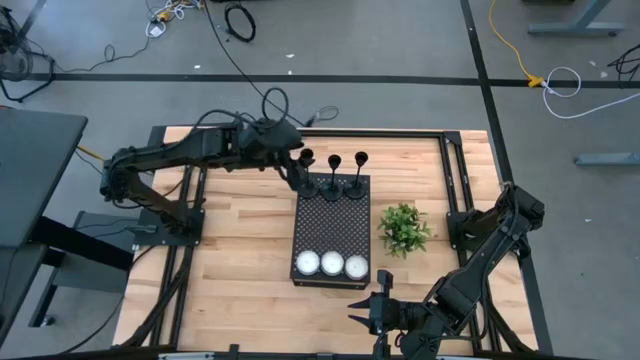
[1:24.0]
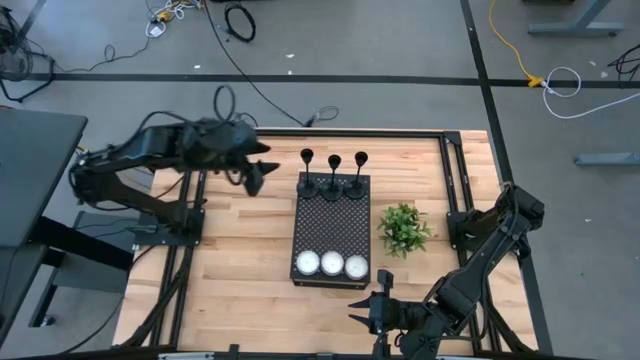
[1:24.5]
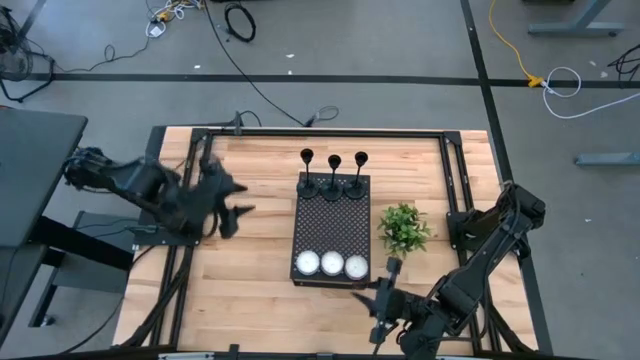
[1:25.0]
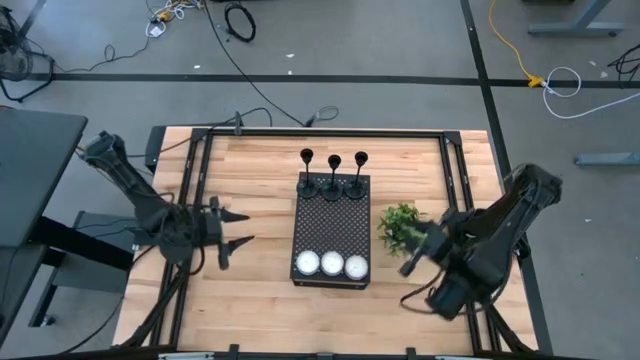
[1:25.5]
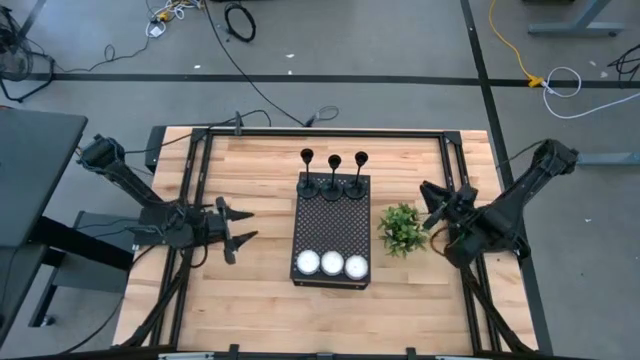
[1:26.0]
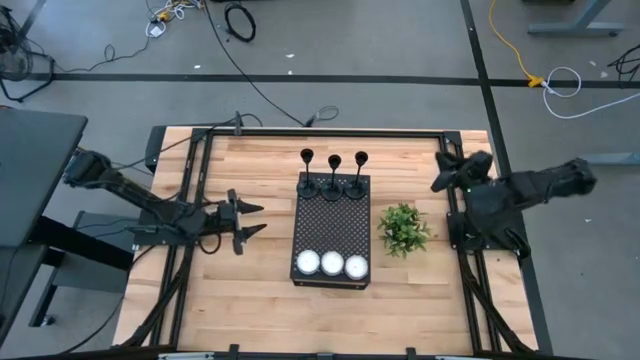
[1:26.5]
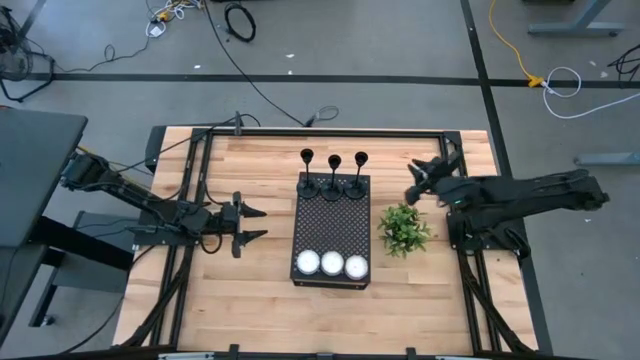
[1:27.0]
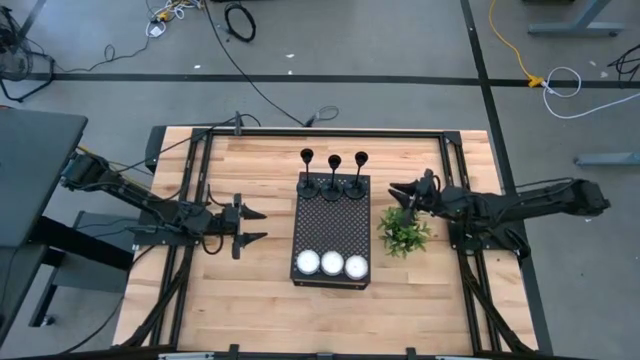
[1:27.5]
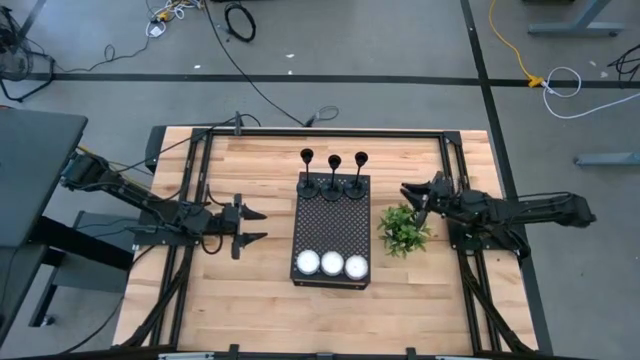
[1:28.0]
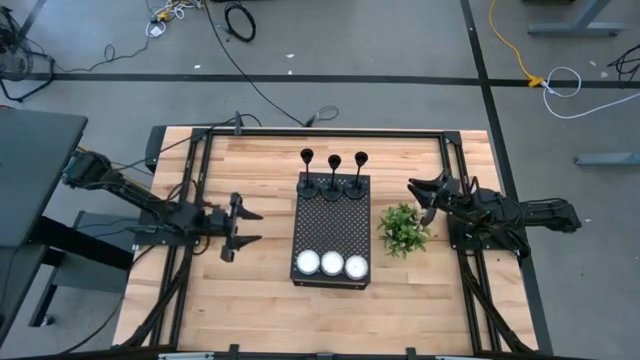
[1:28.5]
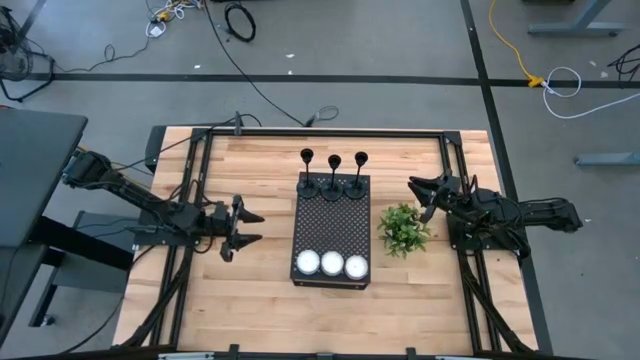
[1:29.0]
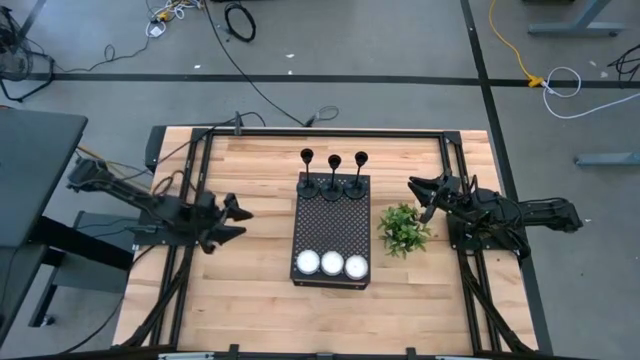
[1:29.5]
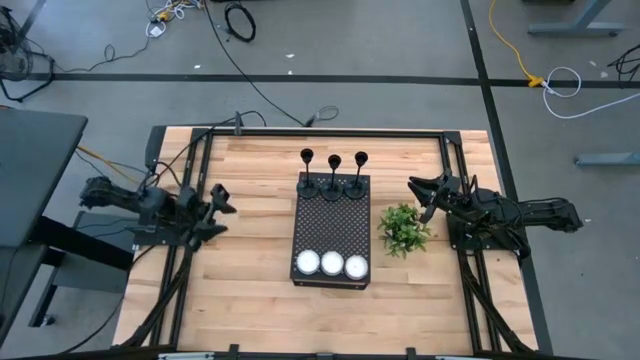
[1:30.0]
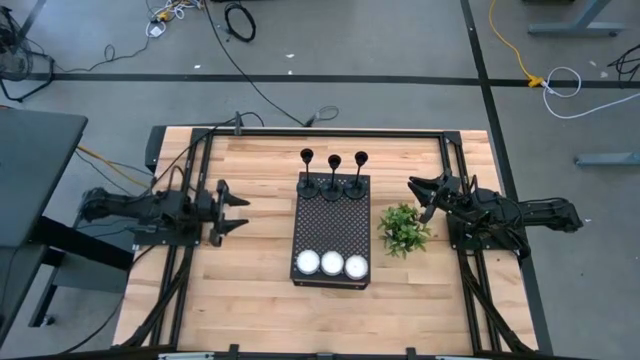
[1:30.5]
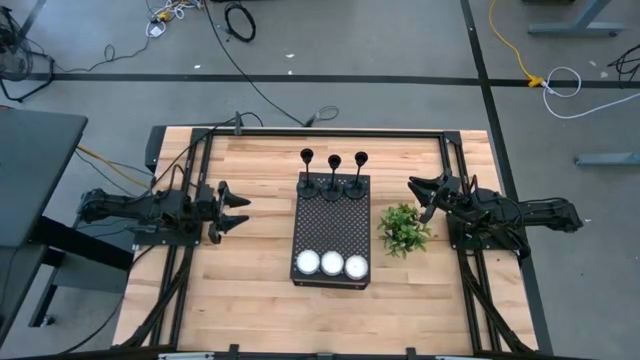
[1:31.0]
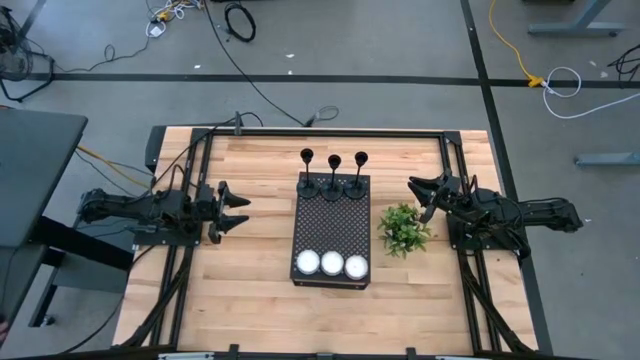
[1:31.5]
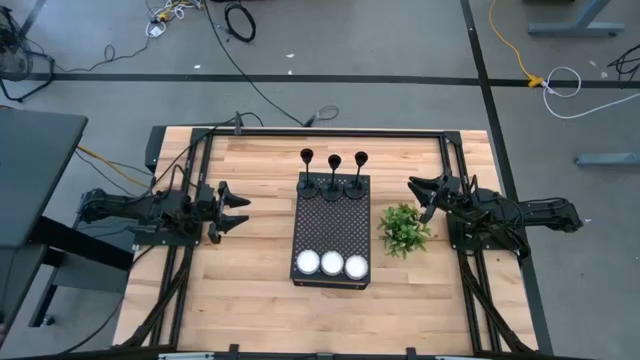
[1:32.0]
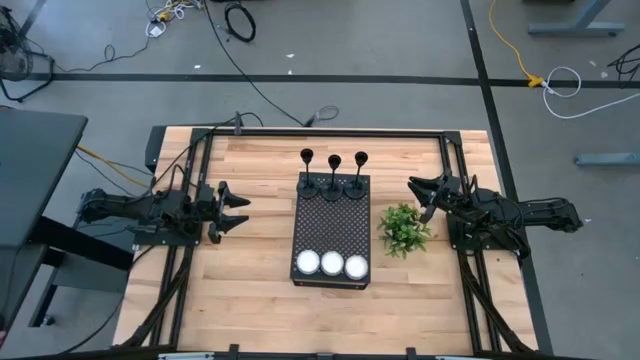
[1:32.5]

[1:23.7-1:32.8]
Task: Pick & Place candle stick holders
Return to Home Position

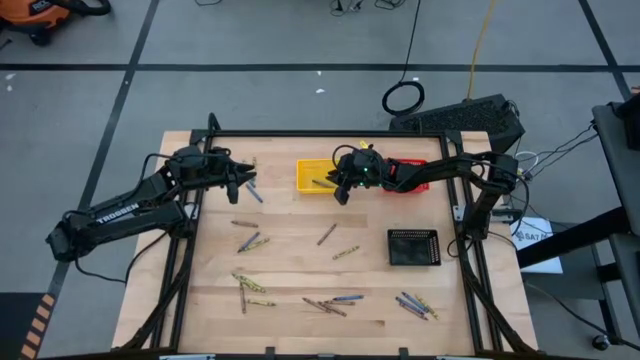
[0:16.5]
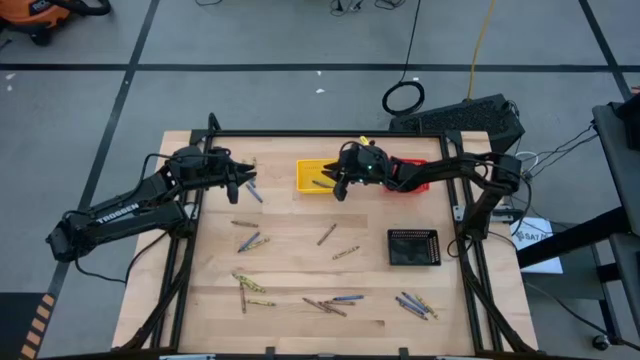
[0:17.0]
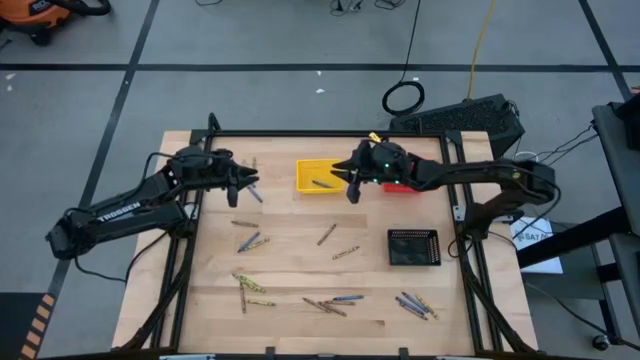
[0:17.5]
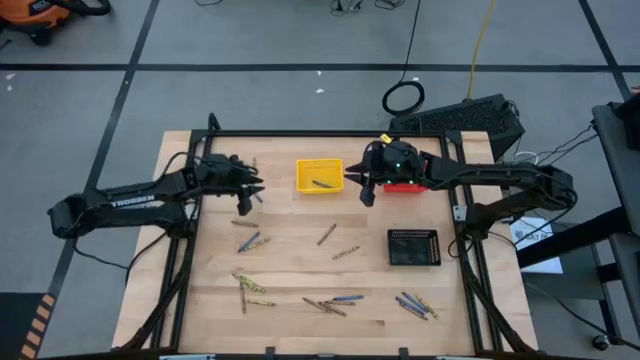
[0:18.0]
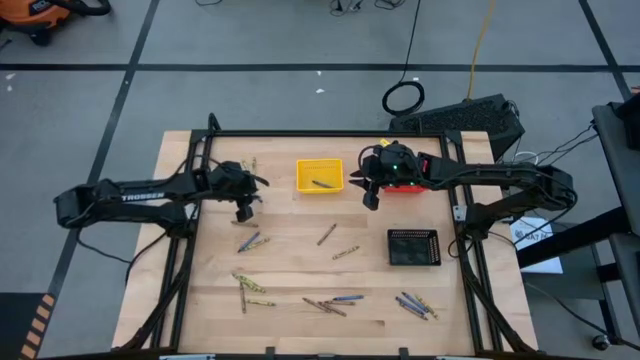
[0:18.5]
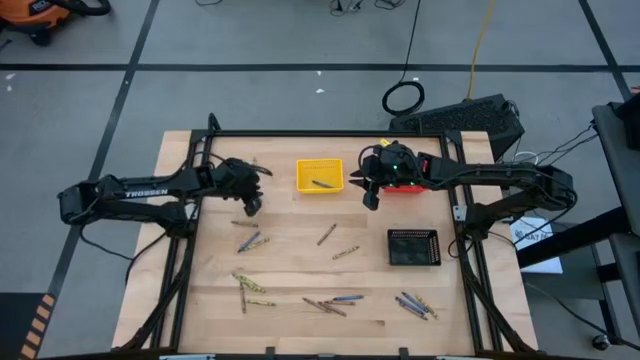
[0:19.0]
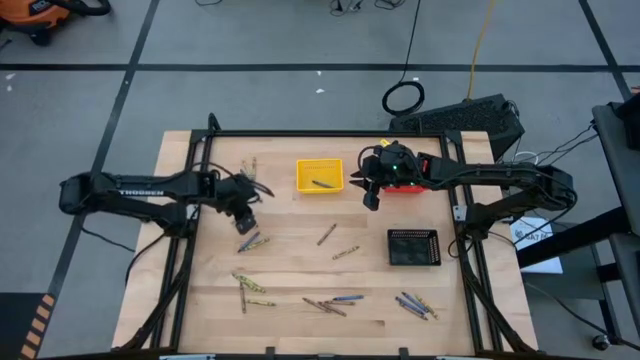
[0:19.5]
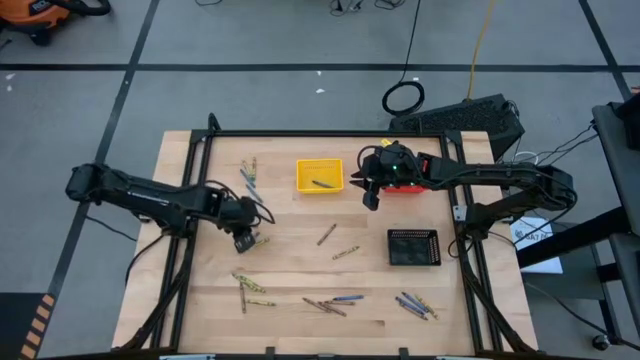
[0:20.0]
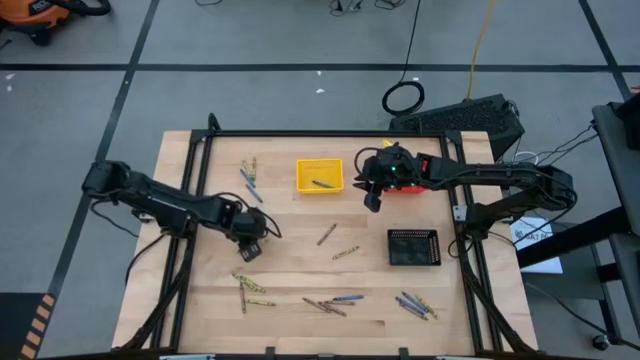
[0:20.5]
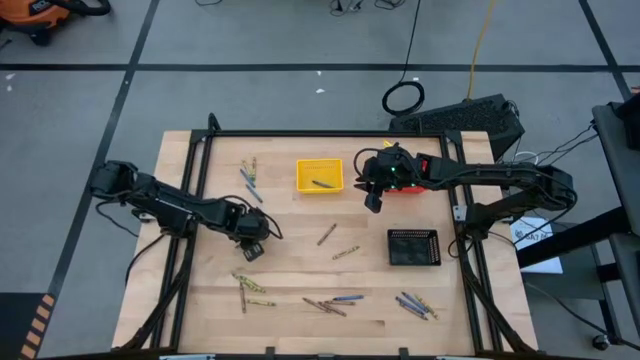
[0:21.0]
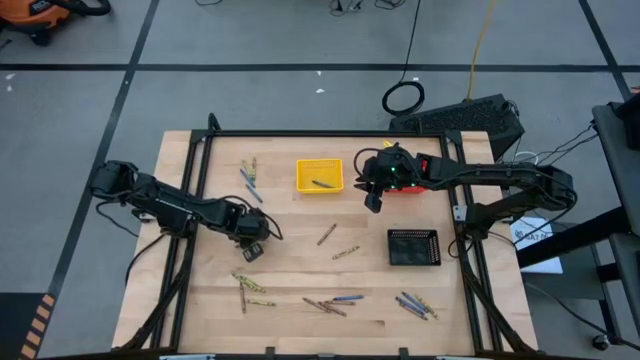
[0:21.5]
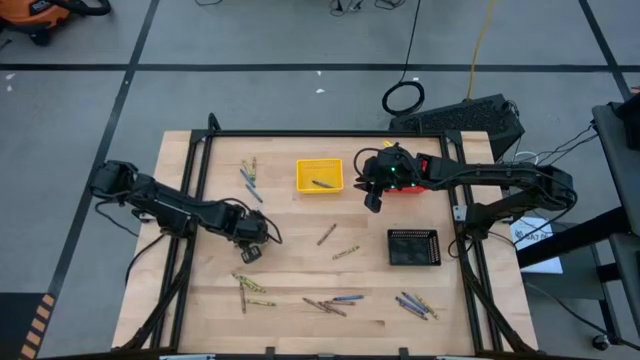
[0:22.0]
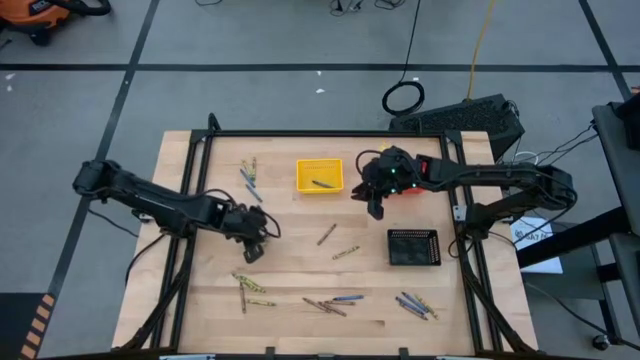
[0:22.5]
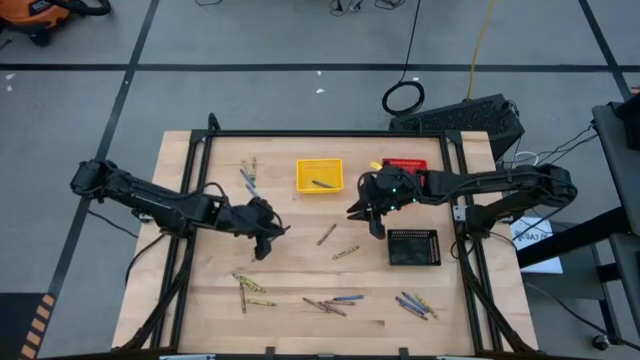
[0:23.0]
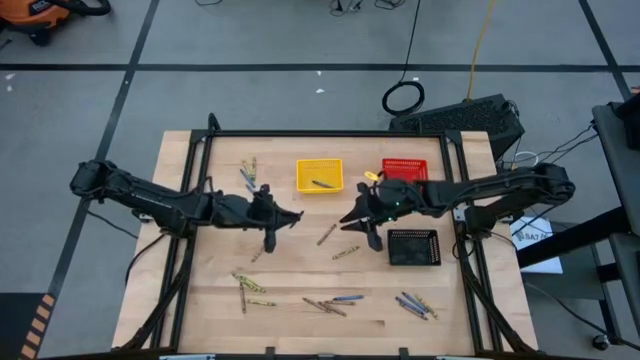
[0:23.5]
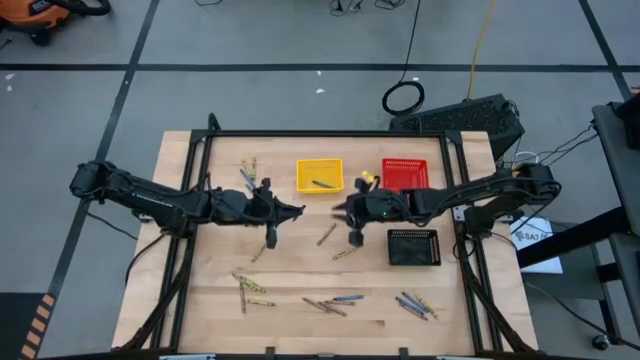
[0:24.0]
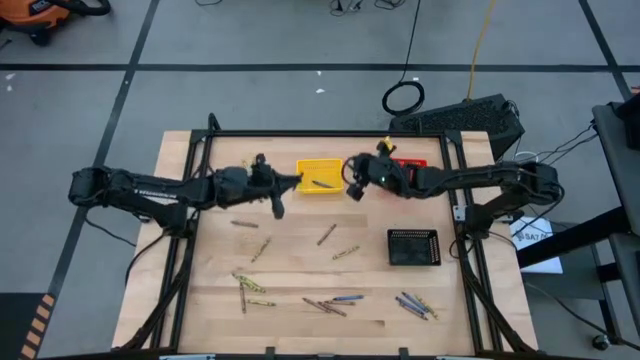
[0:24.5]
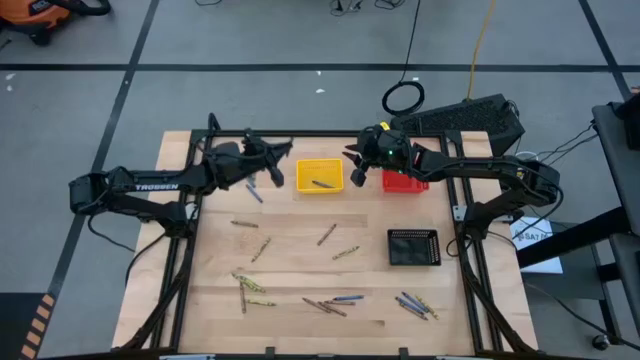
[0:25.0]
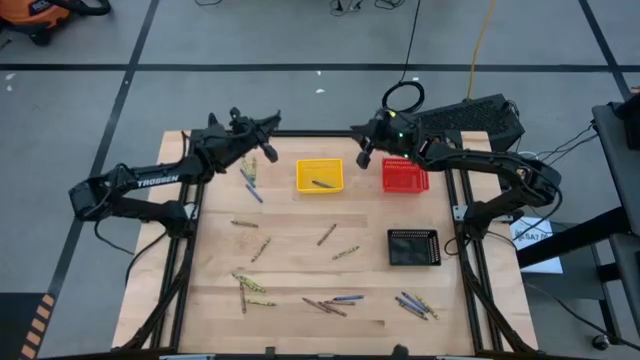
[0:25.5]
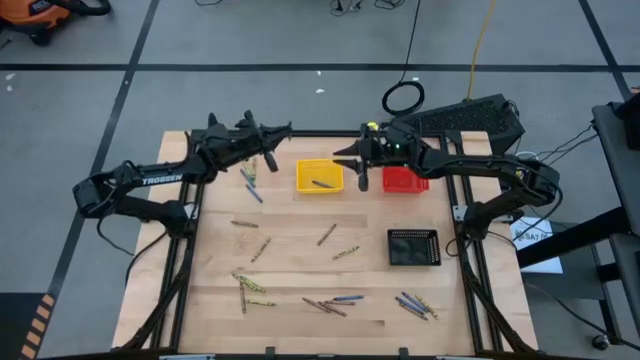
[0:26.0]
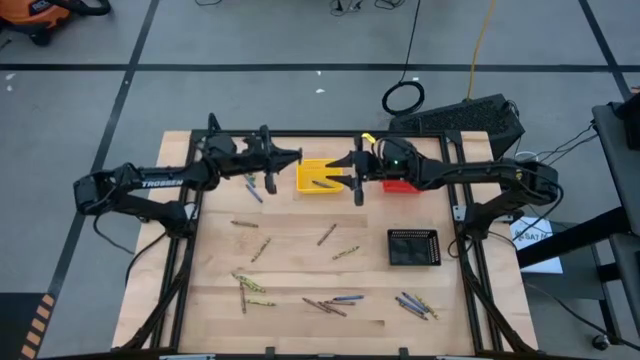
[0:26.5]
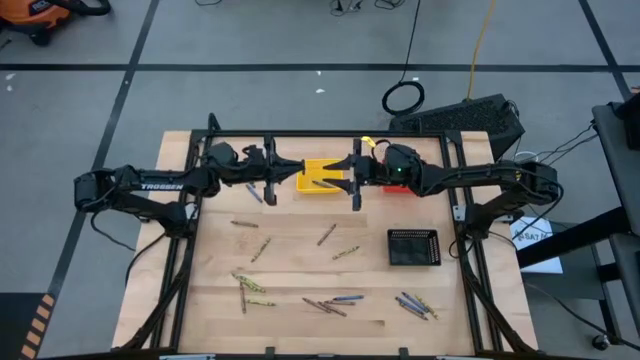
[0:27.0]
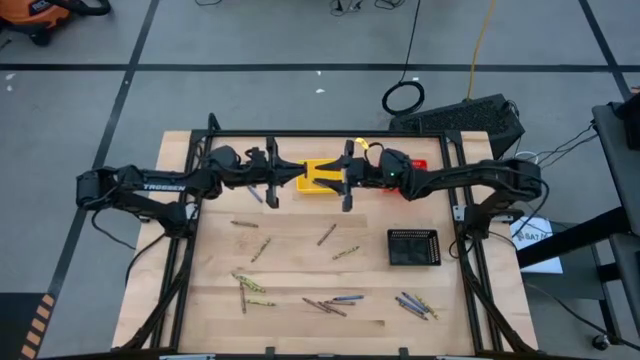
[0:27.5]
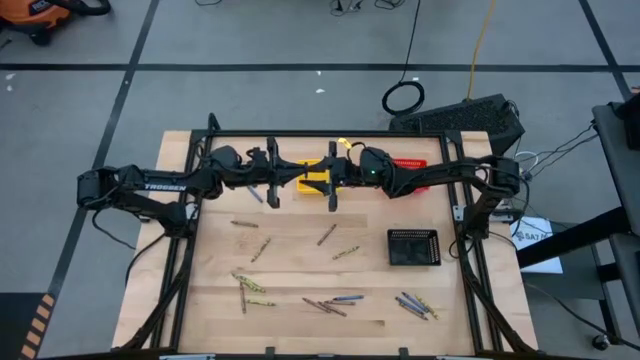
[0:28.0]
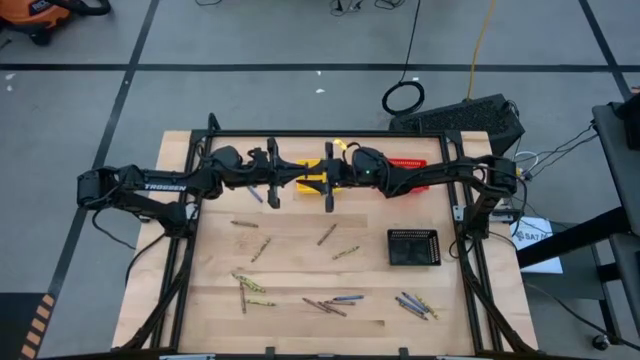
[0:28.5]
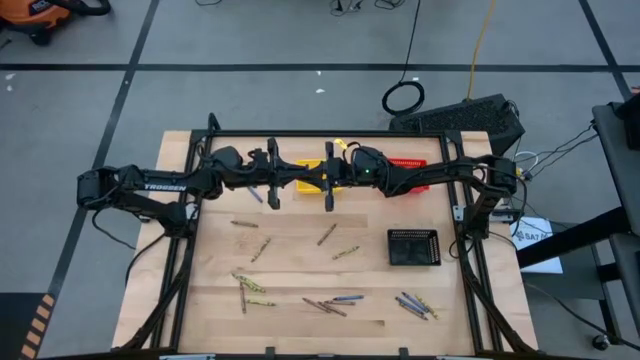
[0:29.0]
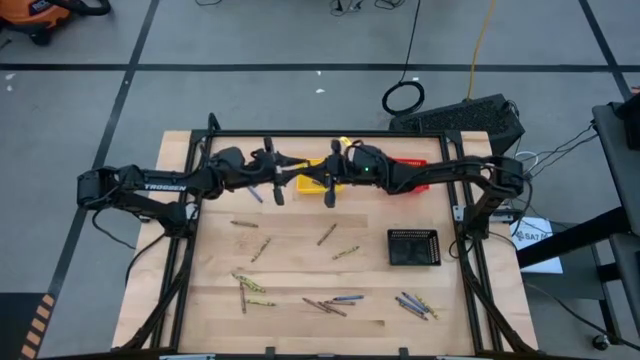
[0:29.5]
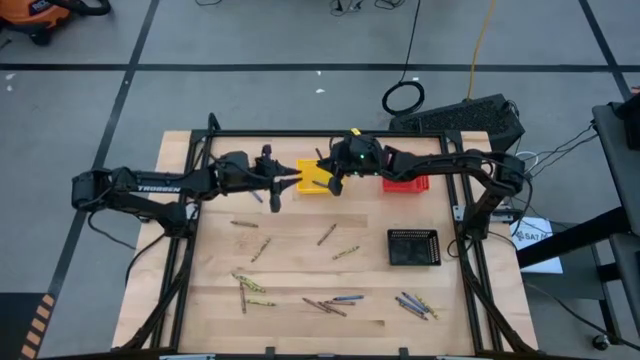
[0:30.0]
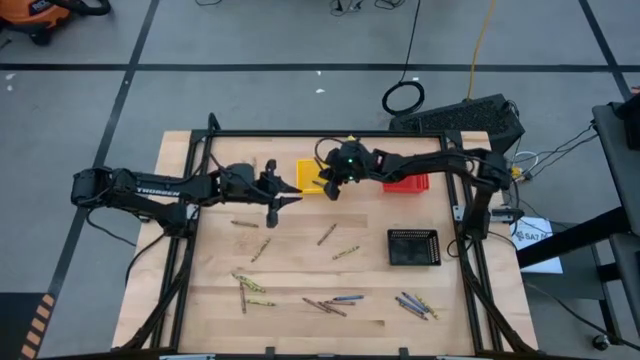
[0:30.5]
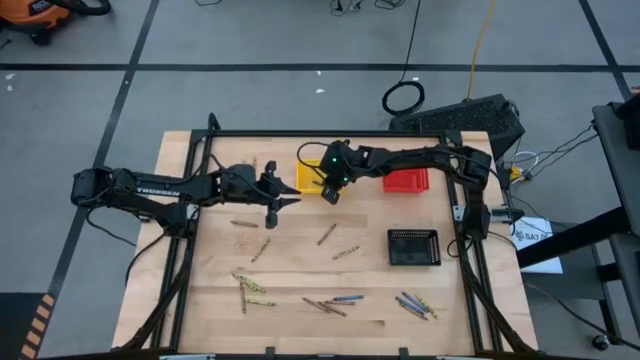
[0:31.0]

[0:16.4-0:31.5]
Task: Sort crayons
Put the blue crayon into the yellow bin
